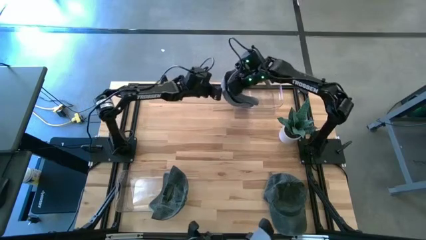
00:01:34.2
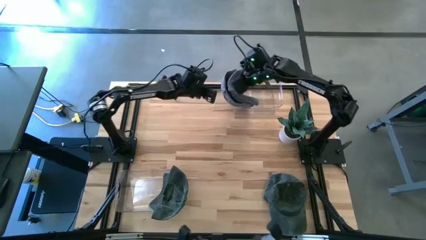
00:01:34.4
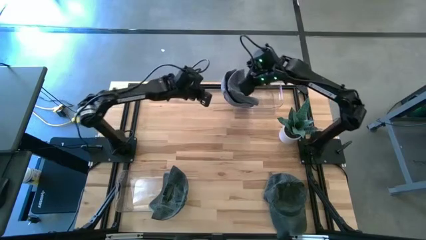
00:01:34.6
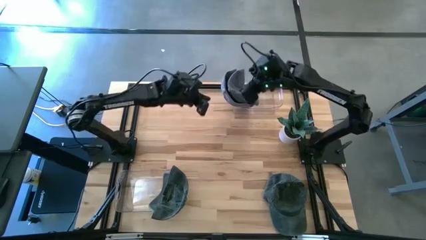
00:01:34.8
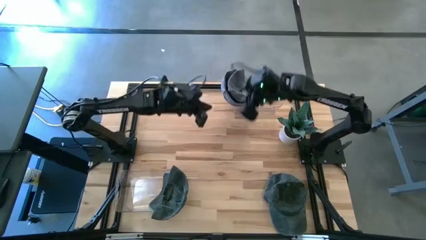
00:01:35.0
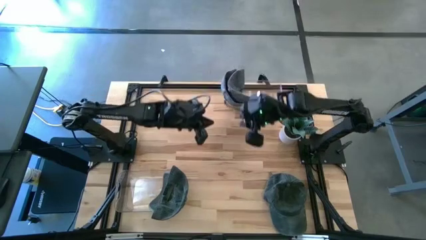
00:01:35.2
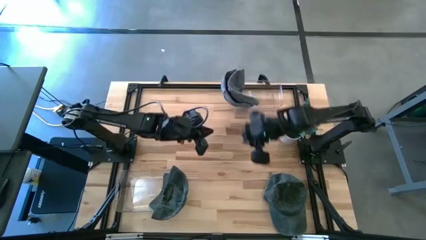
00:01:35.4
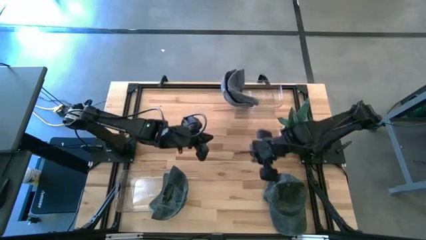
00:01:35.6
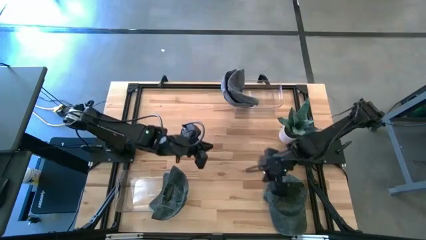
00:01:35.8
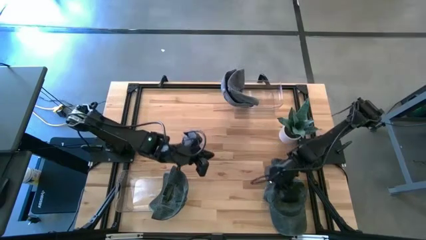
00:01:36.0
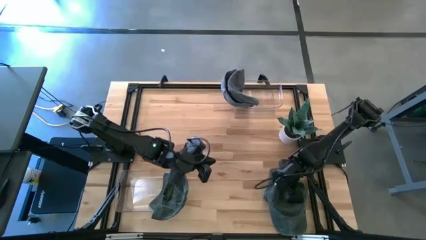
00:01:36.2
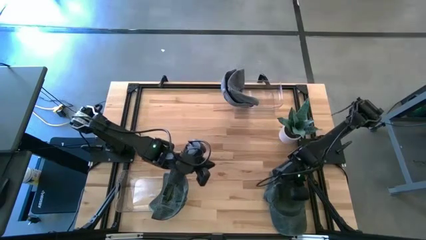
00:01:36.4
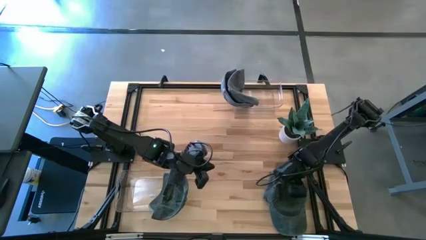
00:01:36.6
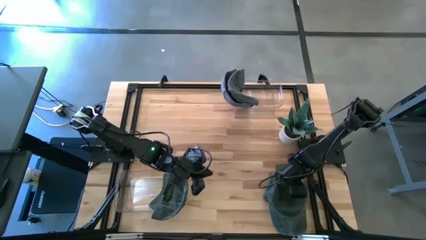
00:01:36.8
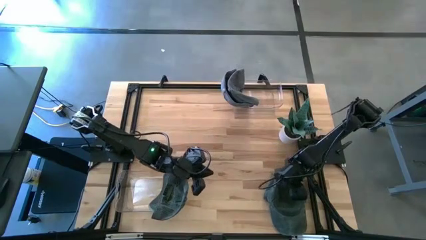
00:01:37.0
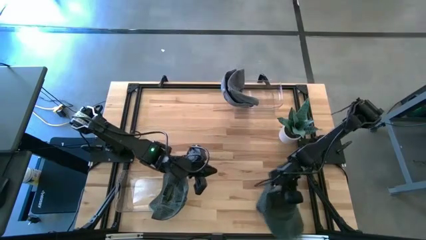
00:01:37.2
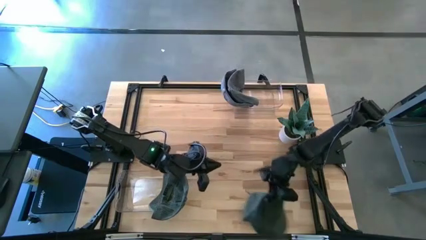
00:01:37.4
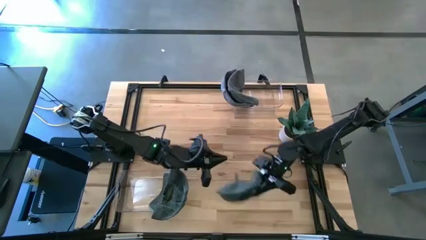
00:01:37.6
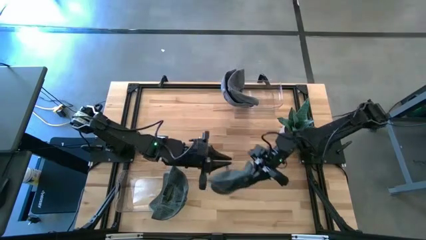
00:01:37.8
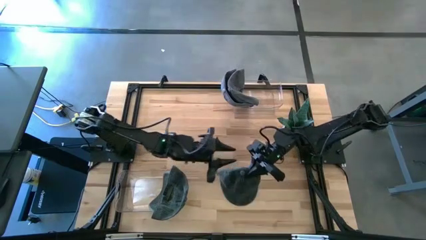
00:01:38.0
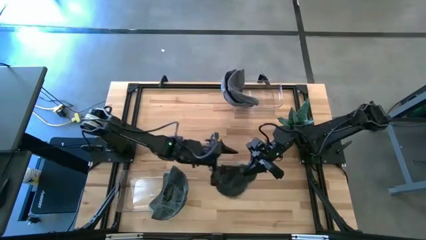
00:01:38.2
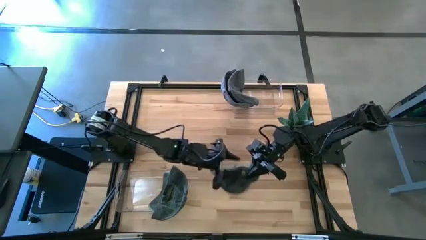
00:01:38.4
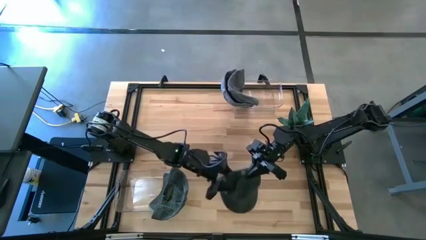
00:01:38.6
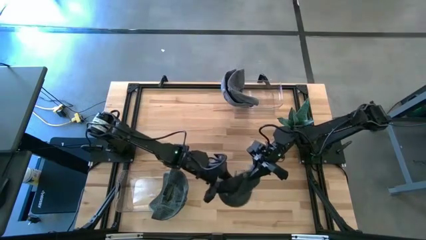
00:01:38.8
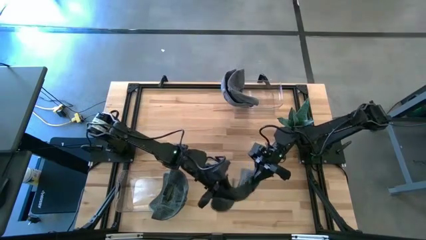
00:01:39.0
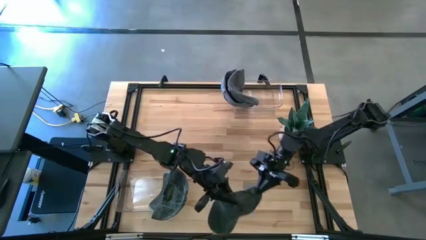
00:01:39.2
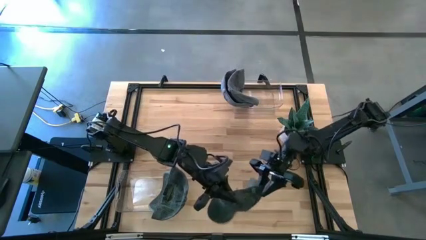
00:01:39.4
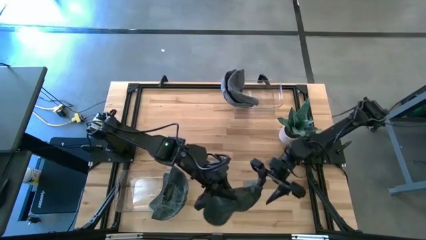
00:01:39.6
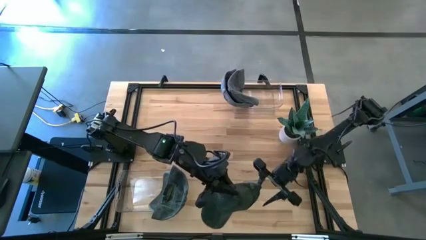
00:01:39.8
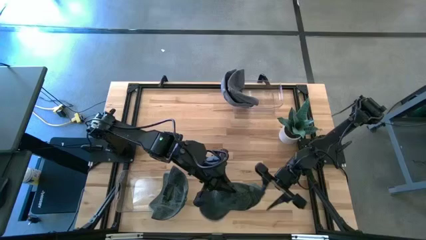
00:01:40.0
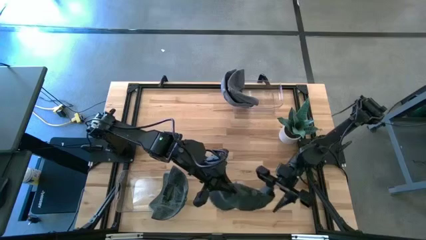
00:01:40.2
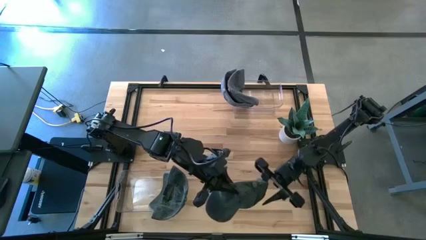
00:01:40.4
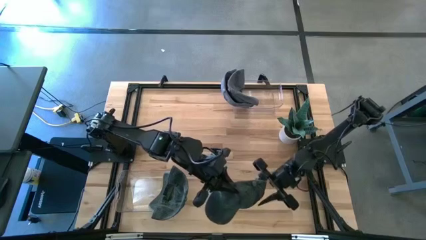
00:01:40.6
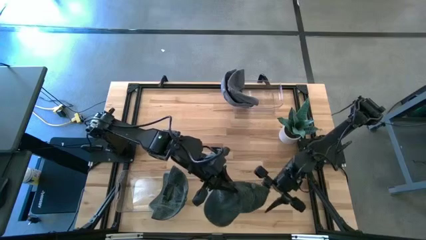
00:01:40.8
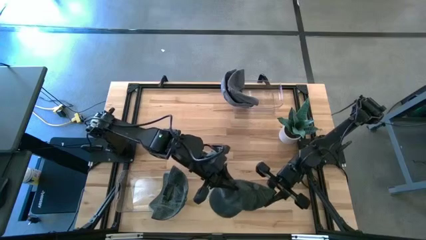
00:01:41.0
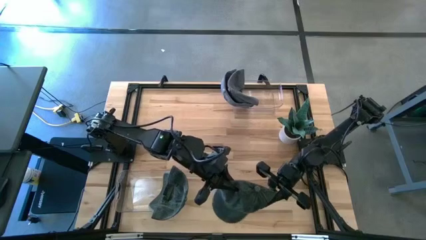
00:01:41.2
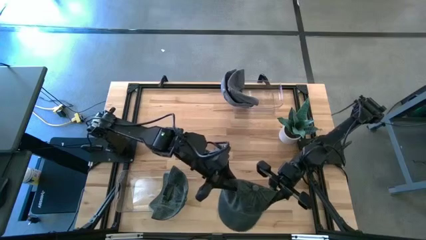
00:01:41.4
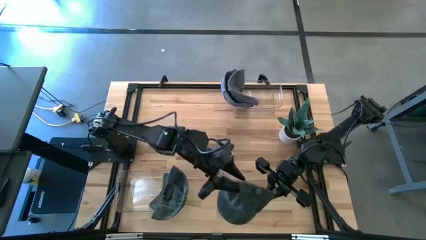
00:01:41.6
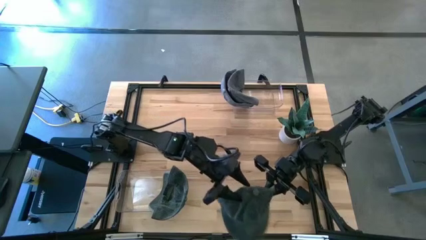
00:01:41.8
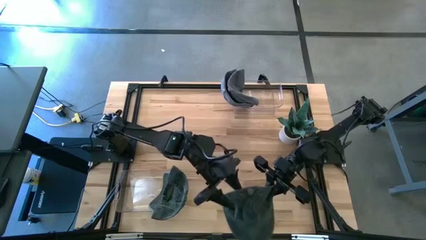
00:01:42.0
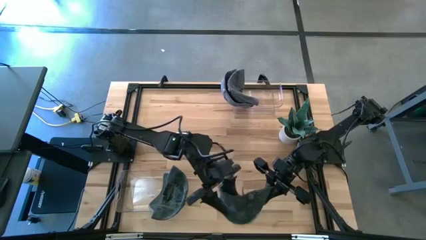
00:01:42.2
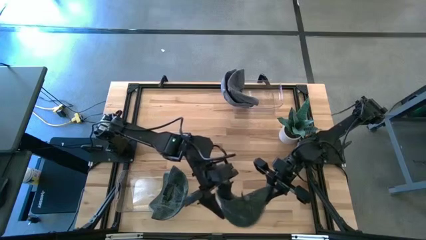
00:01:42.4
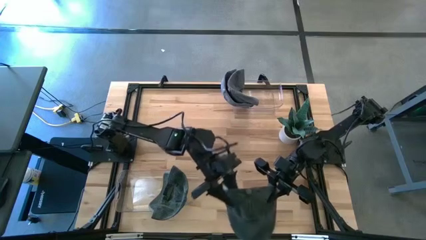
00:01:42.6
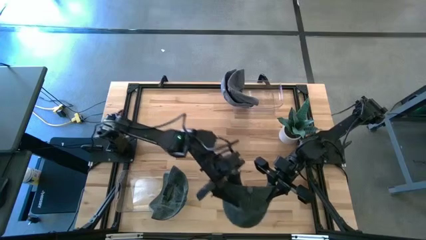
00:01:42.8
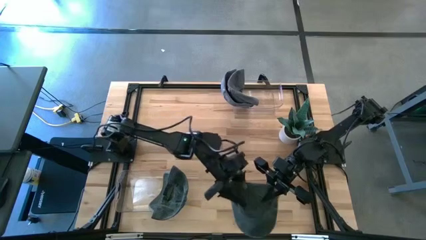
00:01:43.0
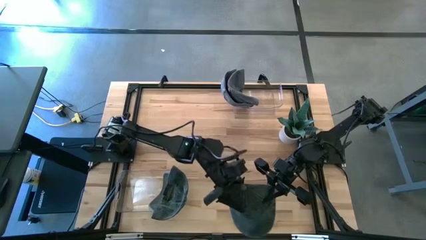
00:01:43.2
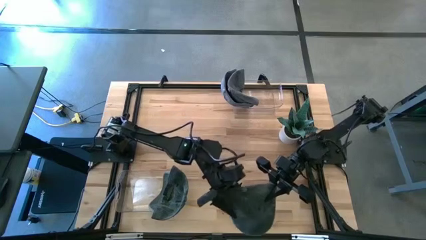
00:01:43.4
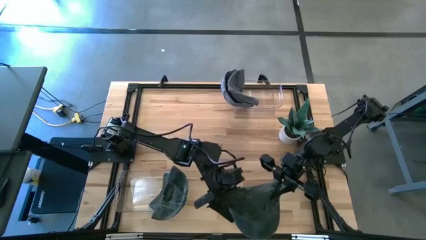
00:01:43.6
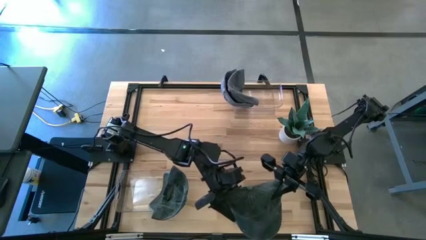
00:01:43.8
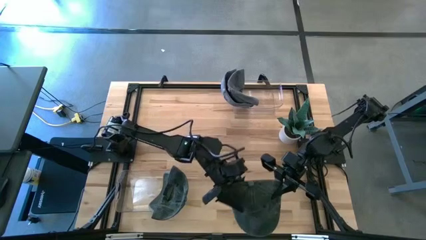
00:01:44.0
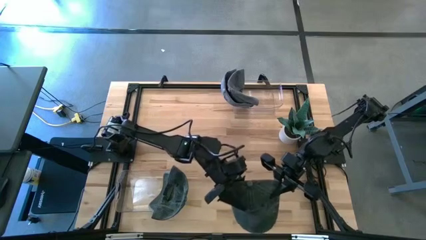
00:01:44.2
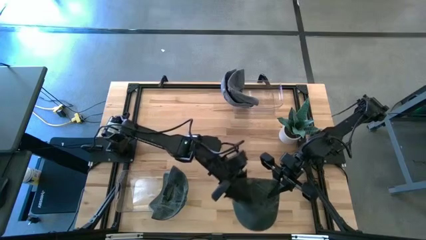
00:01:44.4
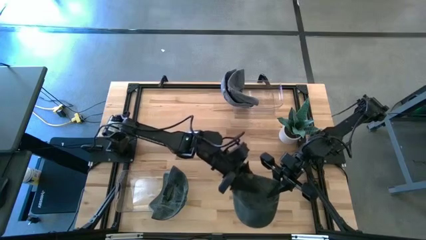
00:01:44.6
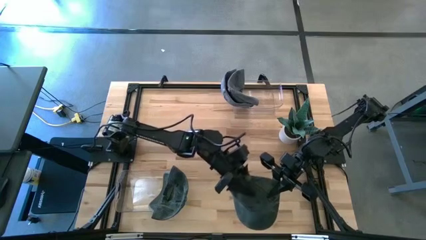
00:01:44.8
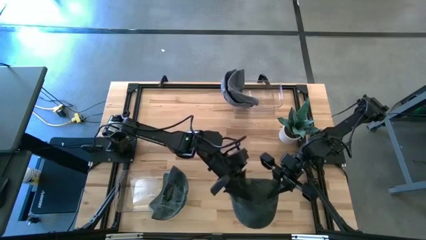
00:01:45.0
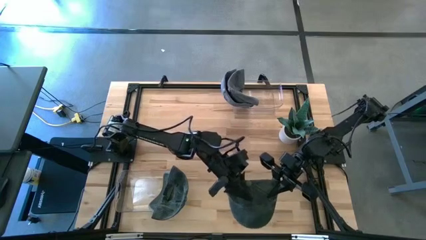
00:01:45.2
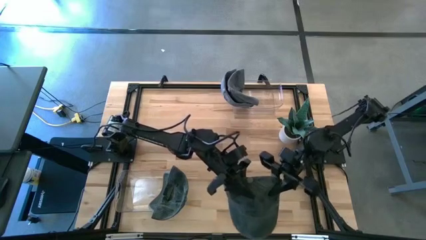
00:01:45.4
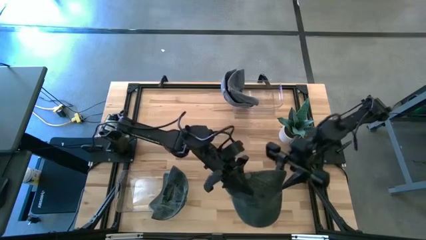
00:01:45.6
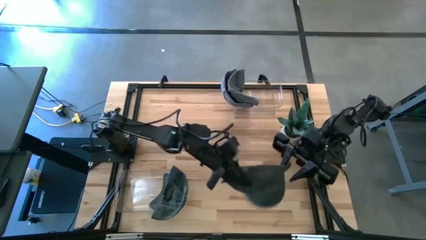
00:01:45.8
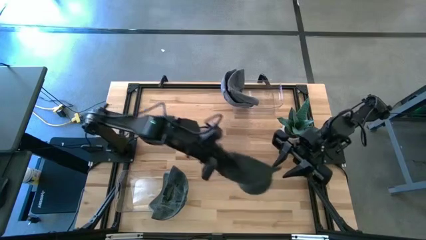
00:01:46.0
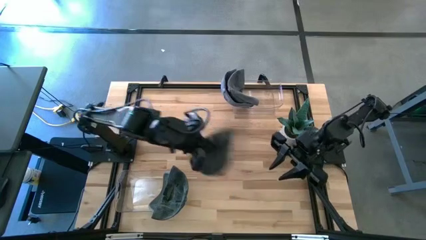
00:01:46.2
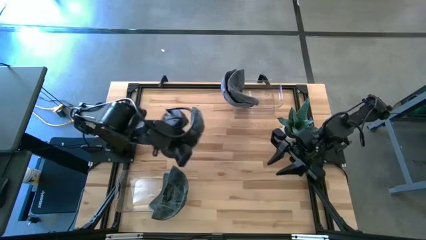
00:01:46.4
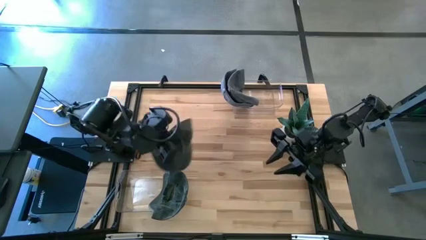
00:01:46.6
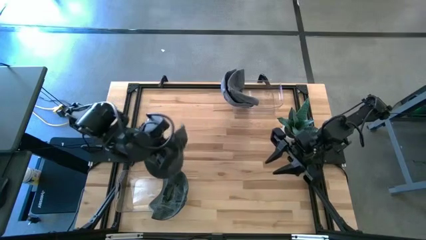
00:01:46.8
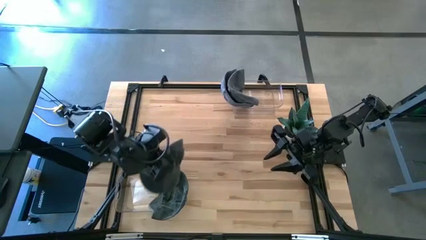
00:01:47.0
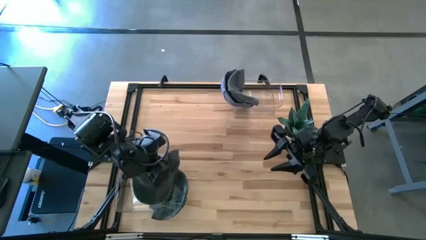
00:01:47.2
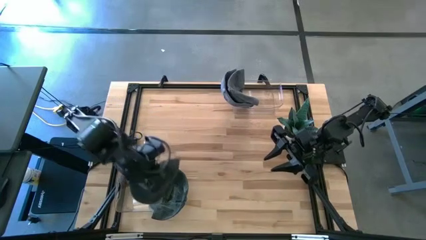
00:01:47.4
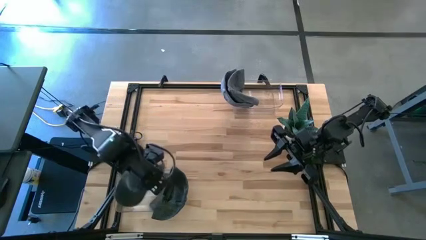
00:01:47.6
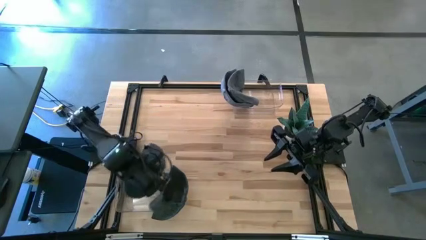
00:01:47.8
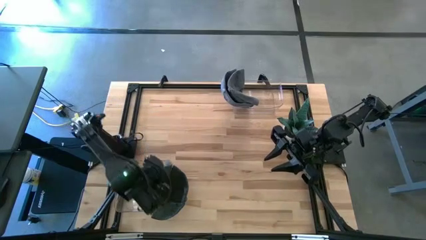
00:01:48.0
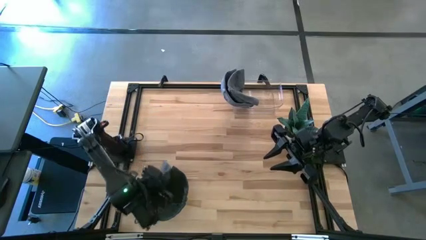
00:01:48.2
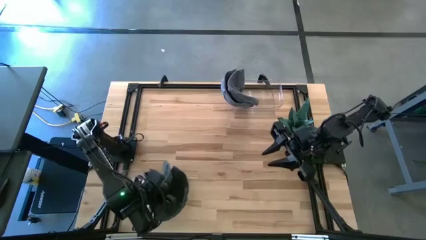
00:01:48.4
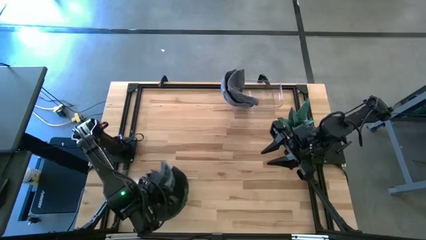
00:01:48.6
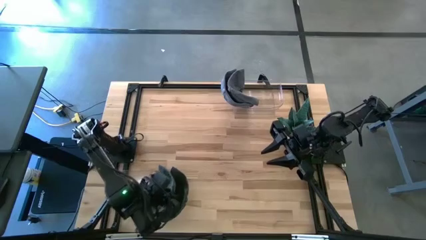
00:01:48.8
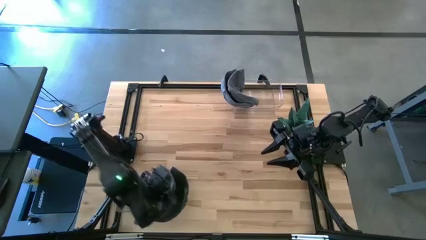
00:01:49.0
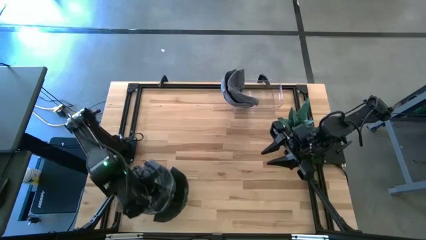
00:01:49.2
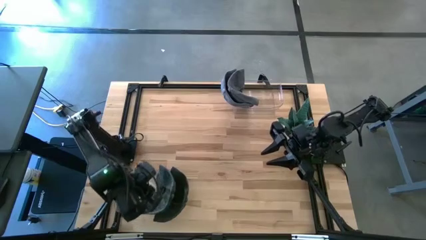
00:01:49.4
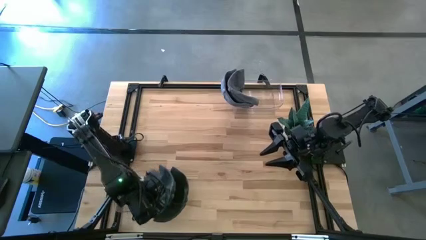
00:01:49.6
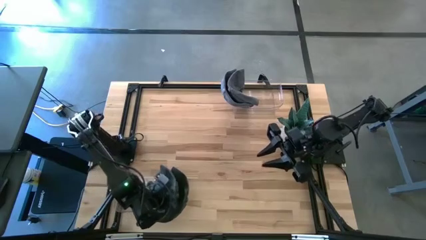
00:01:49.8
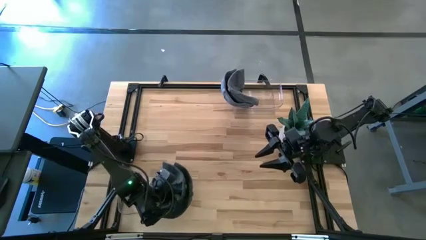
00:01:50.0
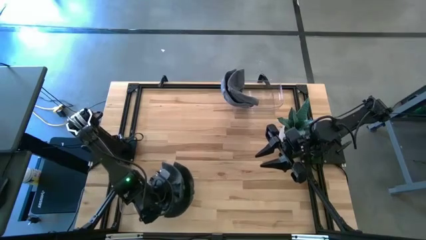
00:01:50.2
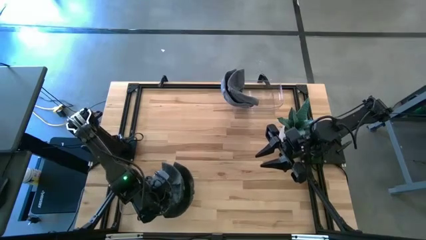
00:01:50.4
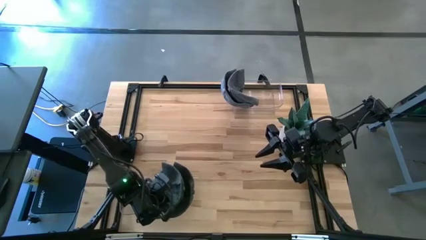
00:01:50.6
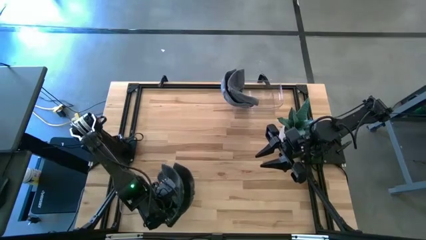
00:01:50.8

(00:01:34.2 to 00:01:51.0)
Task: Pick & Place hat
Put the black cap into the bottom transparent bin

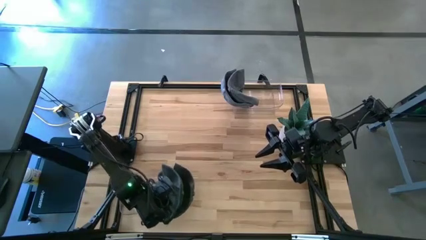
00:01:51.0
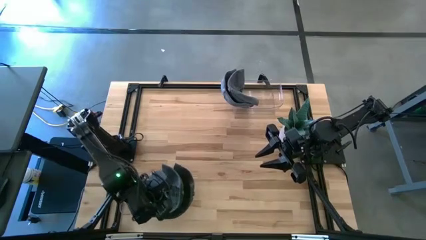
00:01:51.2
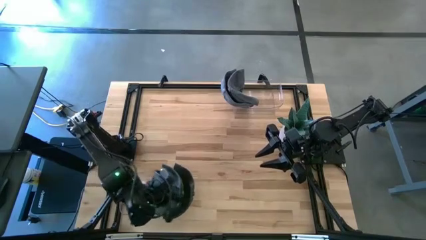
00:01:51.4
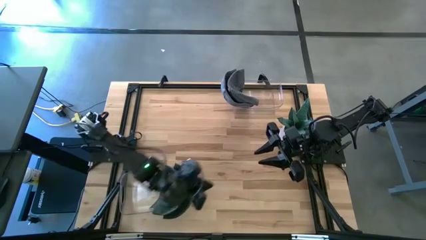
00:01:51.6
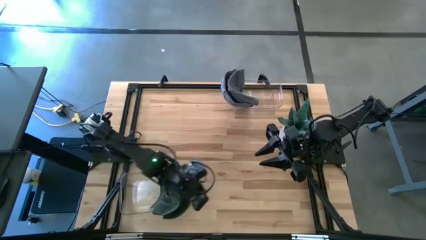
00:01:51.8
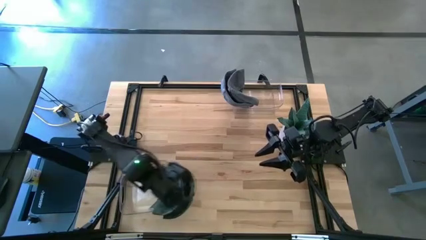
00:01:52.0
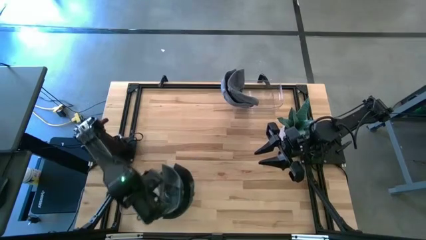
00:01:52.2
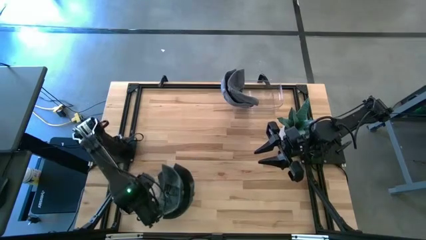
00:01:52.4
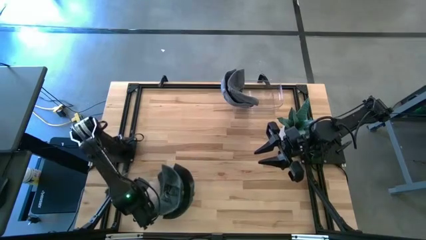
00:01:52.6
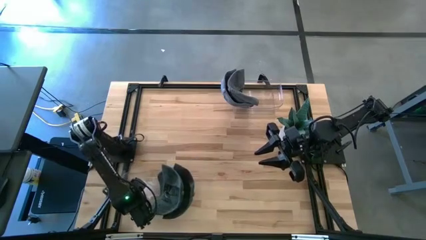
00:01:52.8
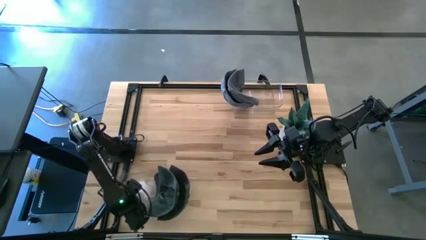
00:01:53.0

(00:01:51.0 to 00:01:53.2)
Adjust the bottom transparent bin
